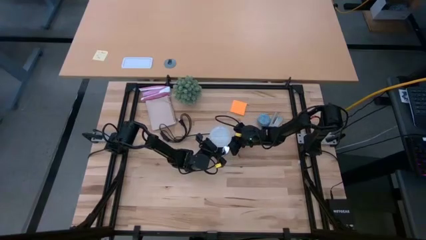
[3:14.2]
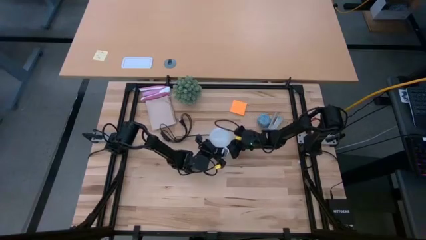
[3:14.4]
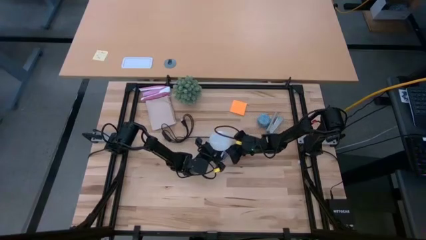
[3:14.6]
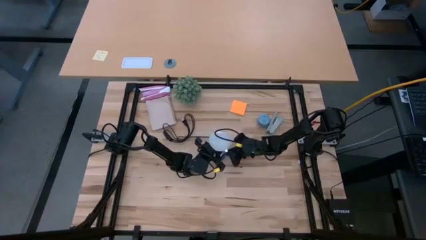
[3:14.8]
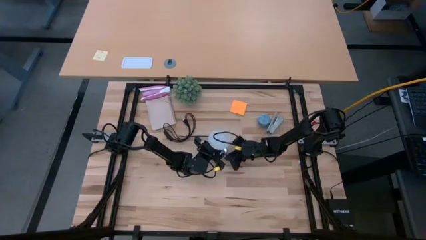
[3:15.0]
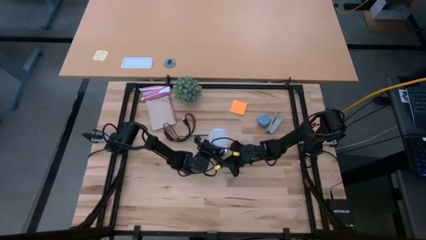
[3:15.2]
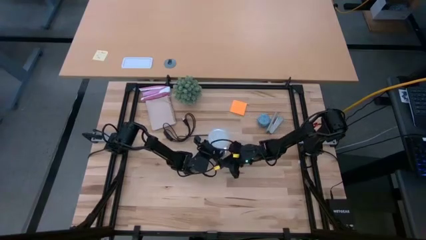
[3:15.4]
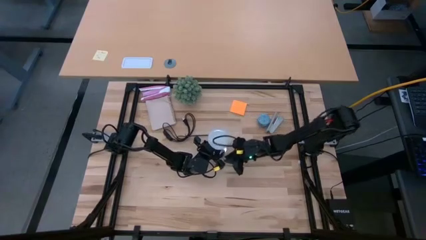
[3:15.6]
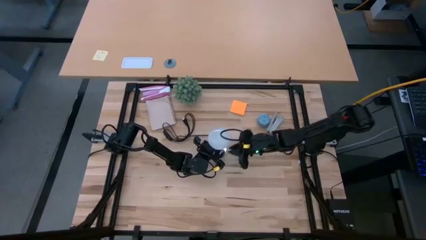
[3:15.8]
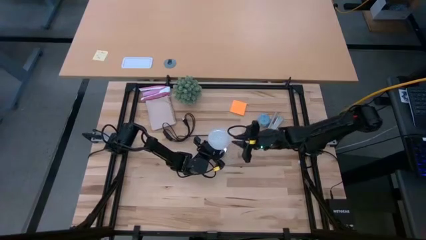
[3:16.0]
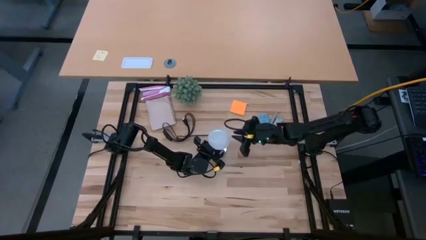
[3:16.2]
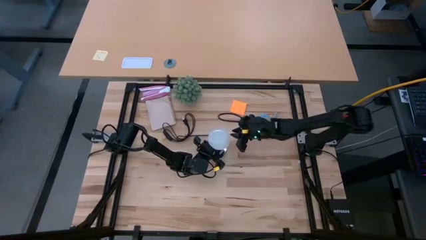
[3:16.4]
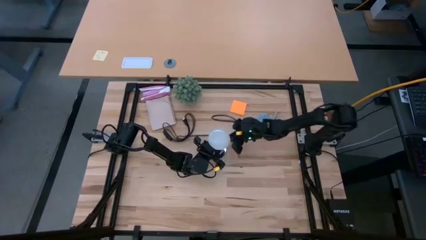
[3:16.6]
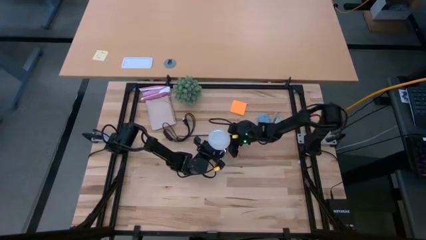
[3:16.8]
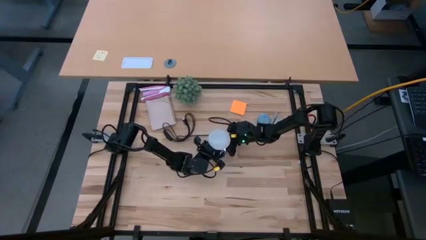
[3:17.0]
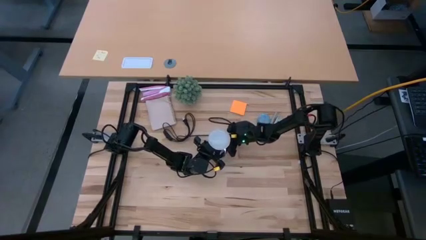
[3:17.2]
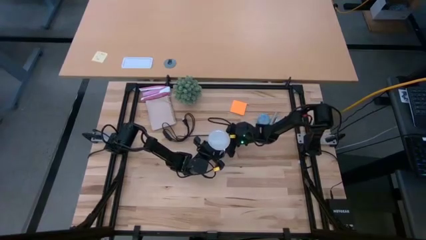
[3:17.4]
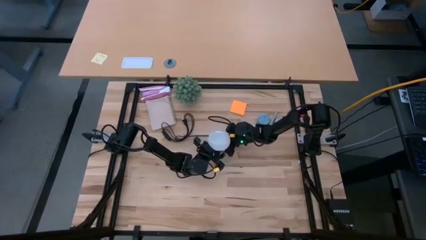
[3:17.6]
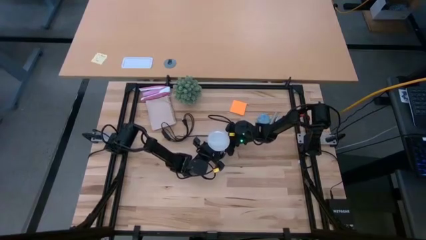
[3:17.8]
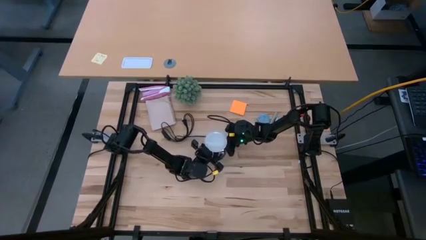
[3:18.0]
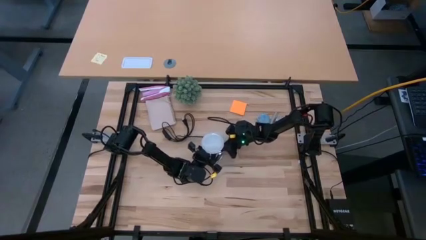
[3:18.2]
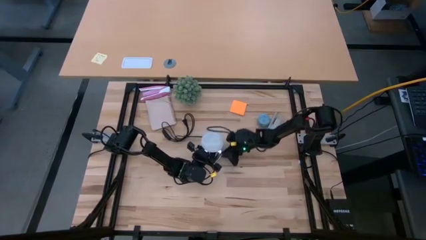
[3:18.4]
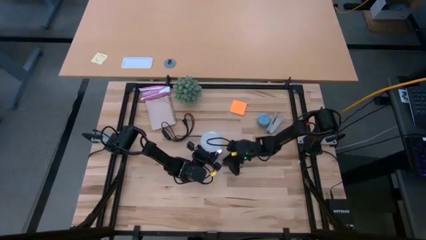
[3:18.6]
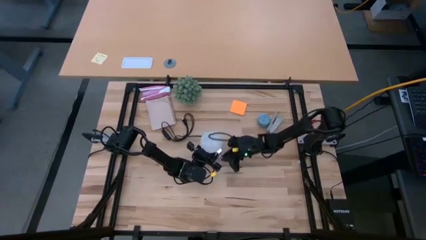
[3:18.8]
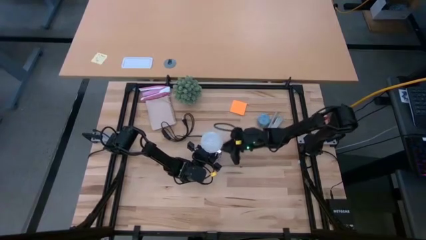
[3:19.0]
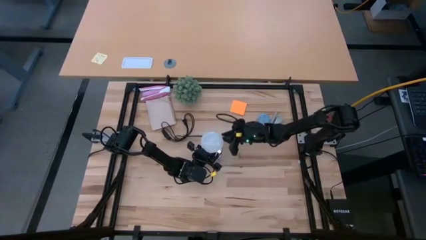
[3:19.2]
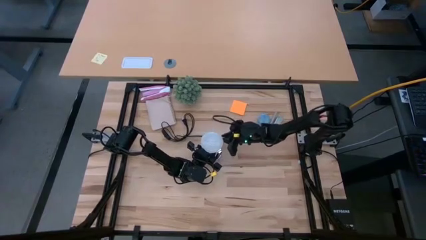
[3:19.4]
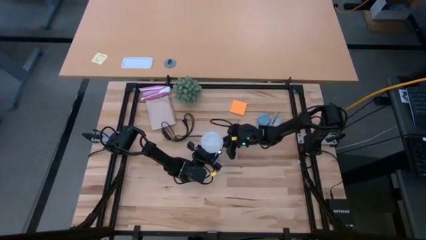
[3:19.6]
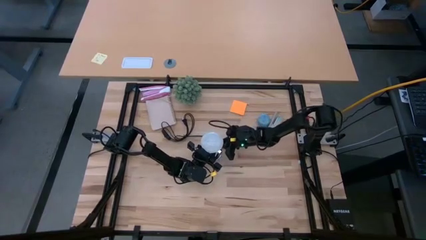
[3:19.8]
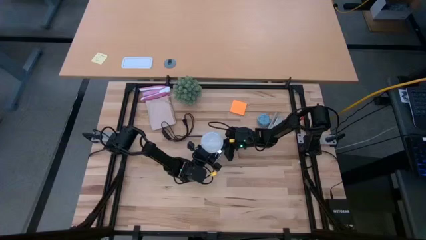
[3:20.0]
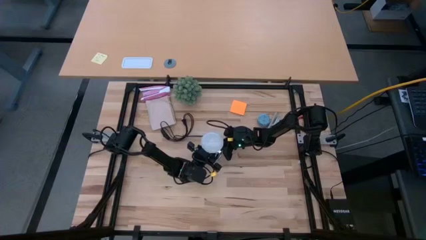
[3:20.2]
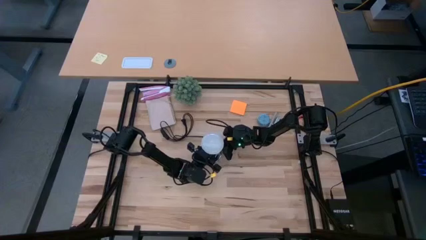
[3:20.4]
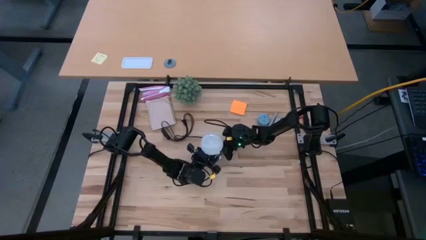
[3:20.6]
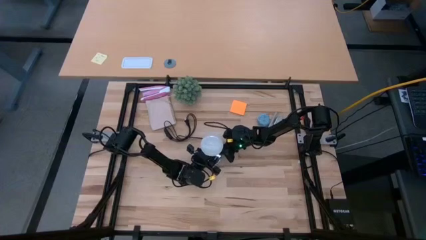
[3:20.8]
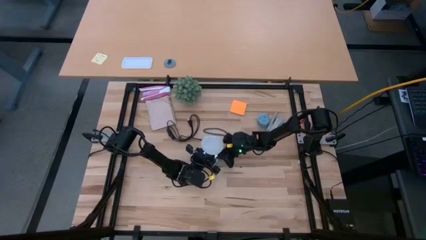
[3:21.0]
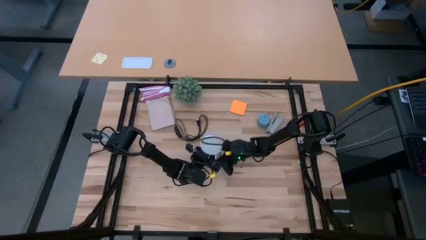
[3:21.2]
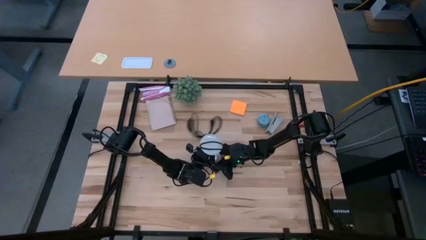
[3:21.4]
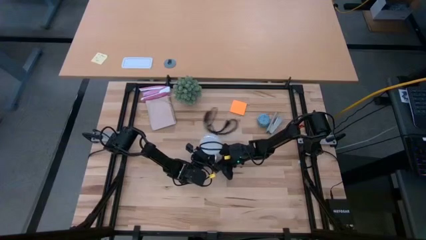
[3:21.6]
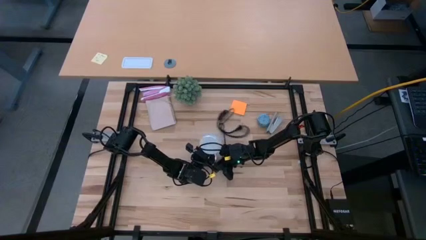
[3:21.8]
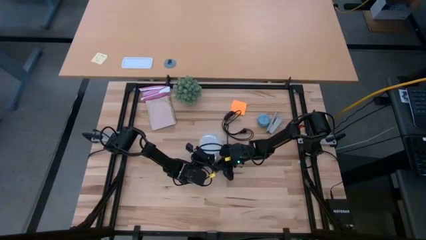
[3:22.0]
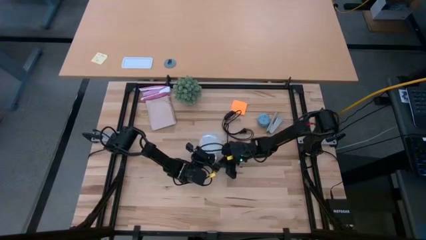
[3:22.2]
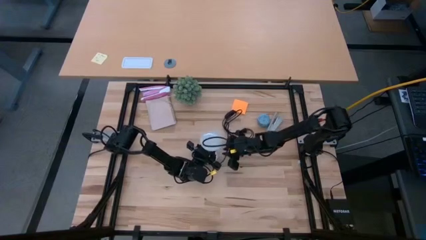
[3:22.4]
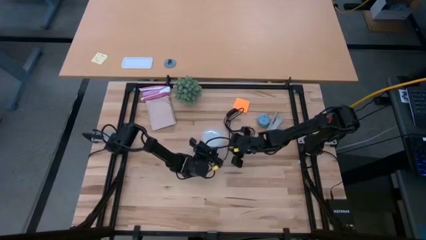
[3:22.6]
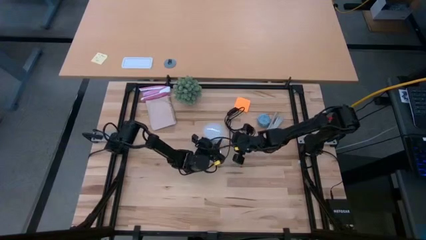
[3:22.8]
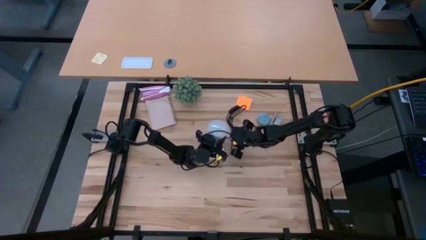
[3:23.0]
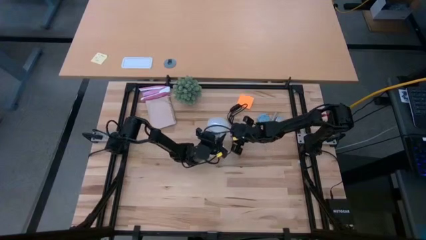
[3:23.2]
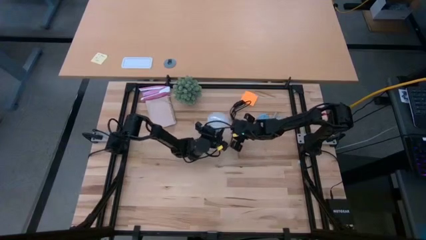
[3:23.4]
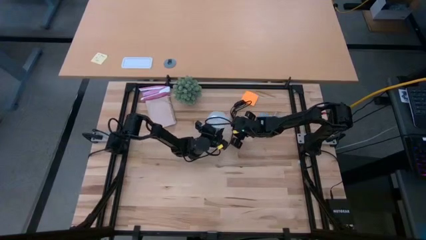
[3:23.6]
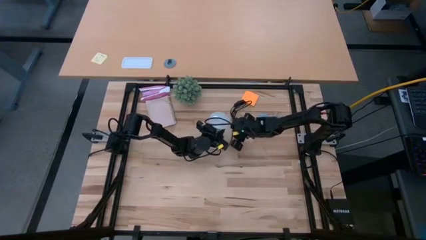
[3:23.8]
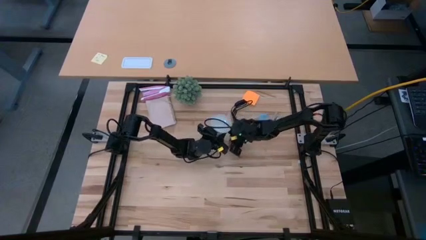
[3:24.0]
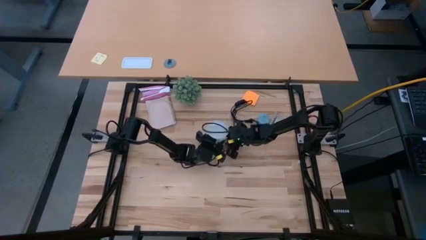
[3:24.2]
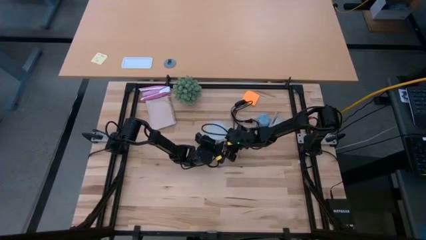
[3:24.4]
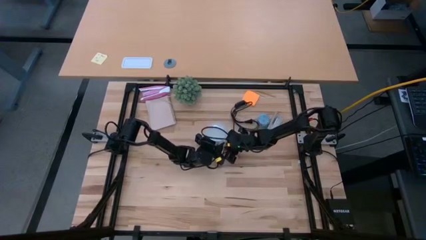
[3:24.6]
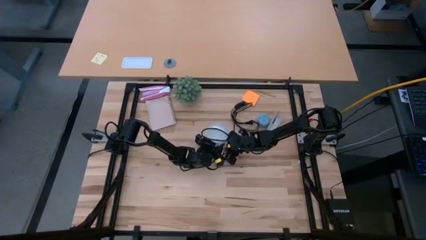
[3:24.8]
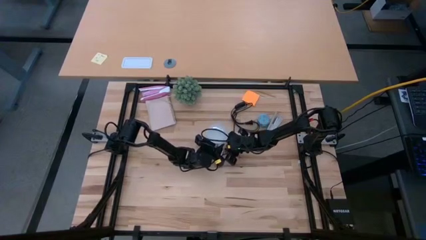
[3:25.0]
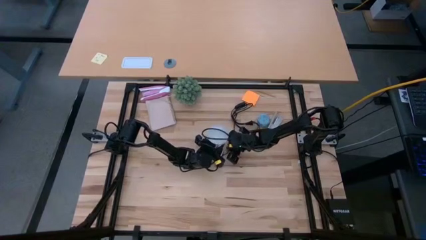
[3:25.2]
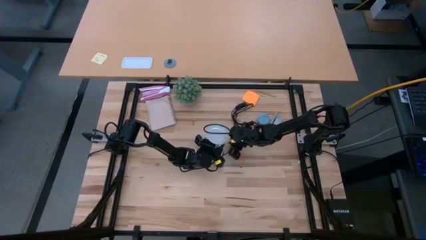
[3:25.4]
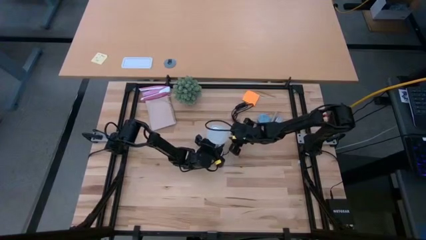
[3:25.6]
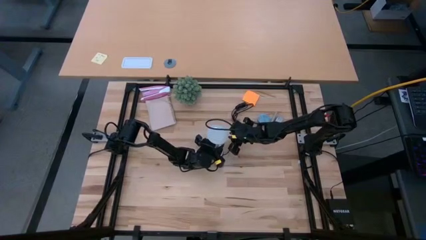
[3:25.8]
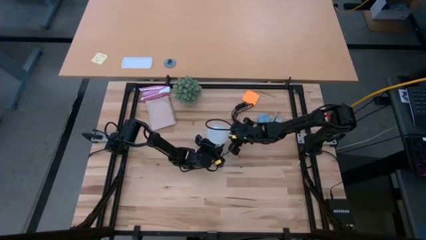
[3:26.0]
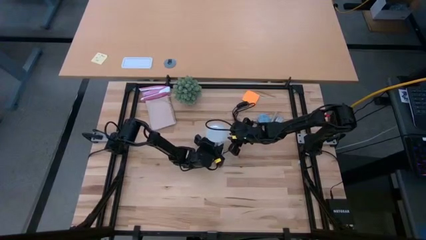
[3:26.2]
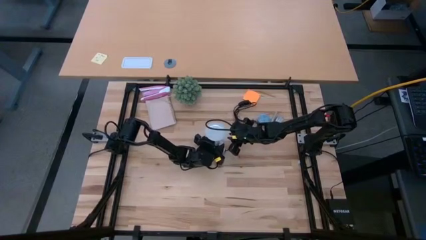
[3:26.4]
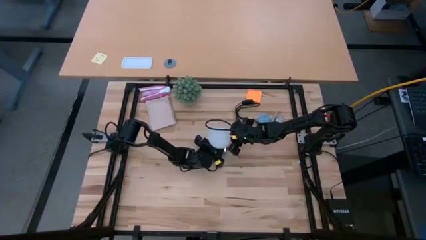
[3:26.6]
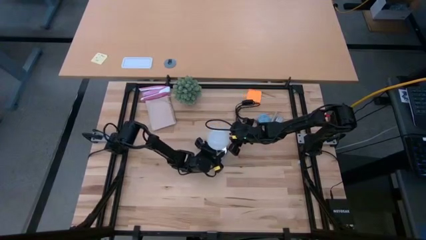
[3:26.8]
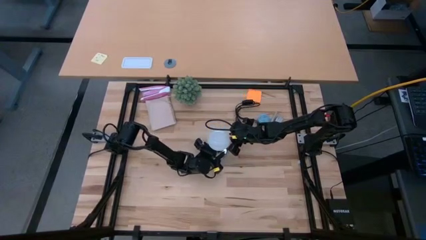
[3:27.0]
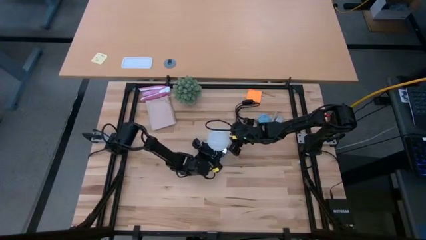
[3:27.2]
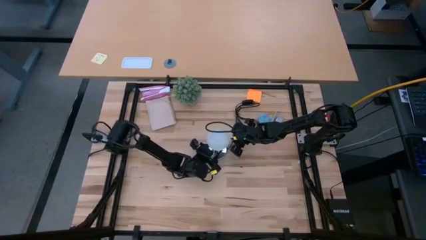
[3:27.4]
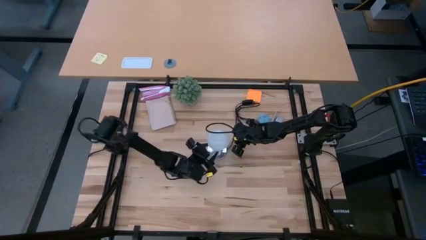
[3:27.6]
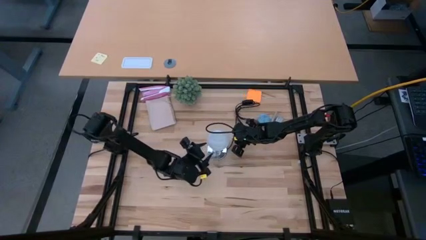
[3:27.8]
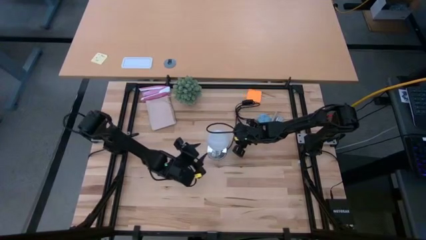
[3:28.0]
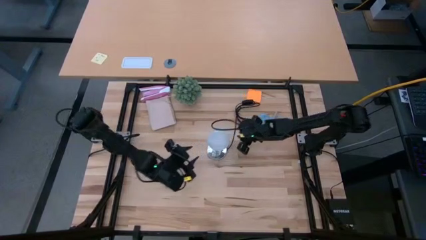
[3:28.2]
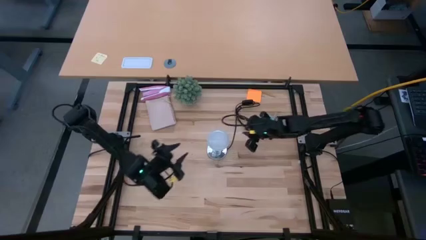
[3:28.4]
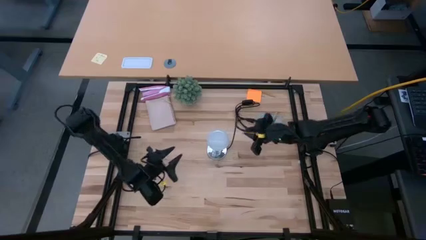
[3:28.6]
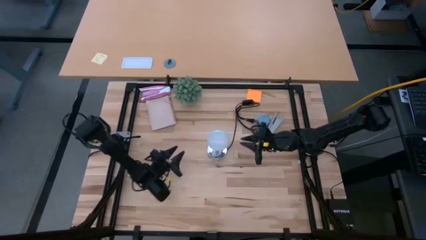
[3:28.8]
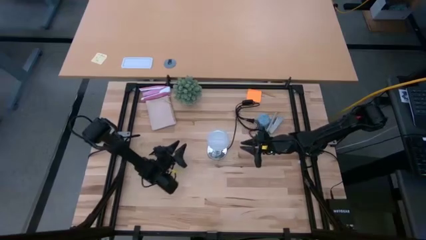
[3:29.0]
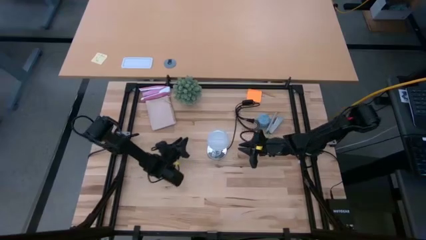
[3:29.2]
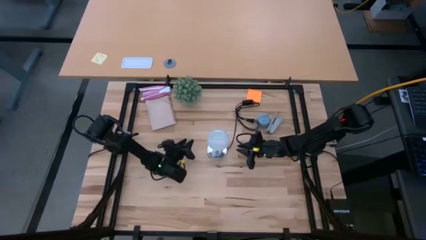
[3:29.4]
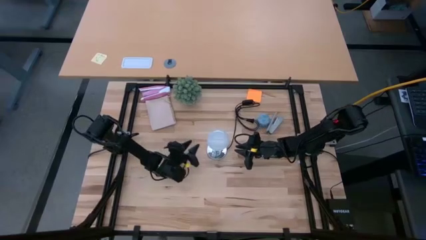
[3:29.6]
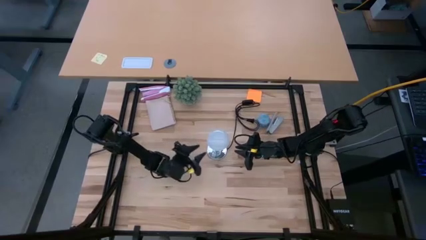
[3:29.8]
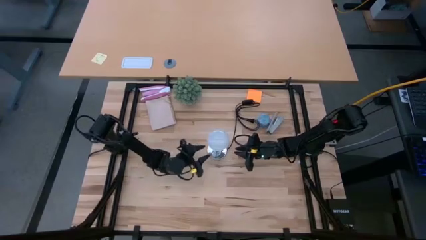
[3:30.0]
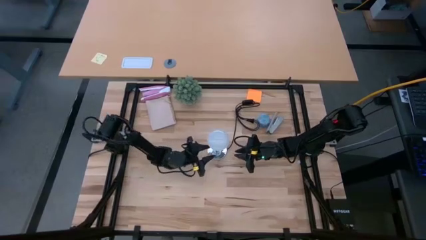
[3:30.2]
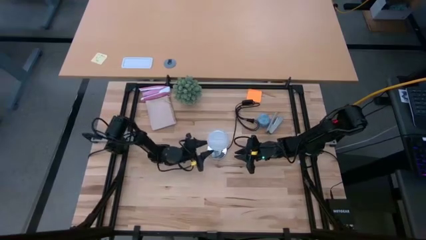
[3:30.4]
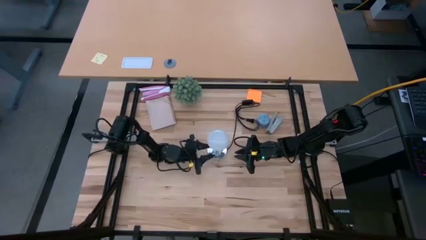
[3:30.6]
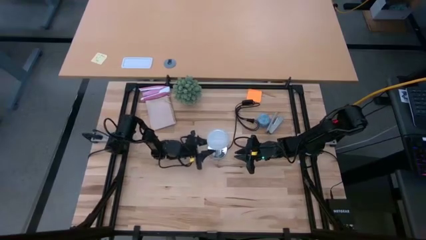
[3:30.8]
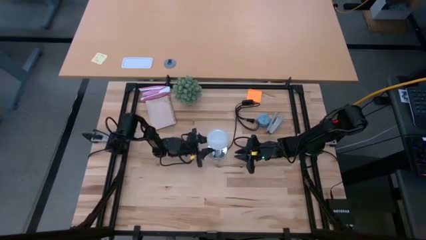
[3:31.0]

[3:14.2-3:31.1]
Task: Screw lightbulb
Remove the white lightbulb from the silver lamp
